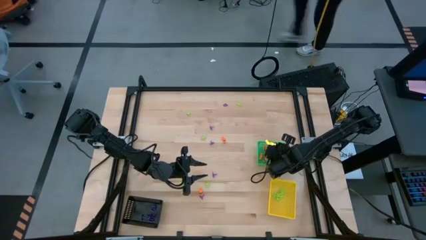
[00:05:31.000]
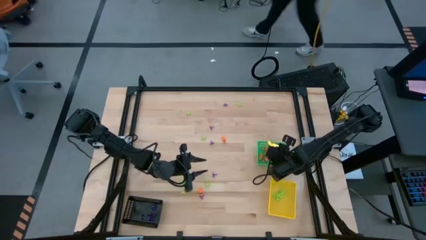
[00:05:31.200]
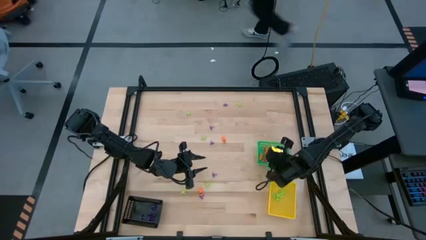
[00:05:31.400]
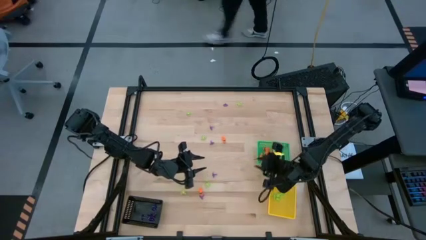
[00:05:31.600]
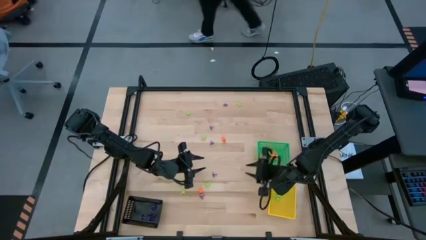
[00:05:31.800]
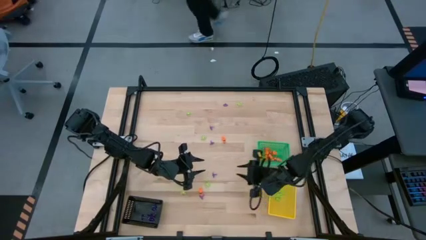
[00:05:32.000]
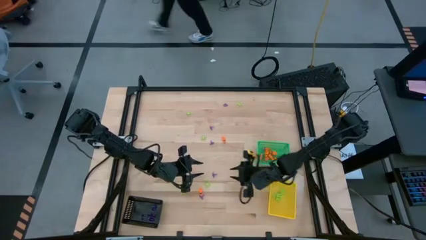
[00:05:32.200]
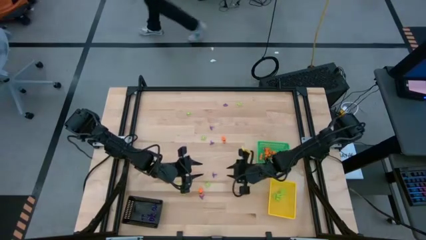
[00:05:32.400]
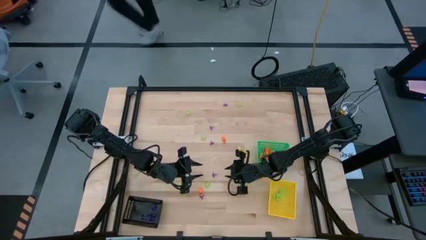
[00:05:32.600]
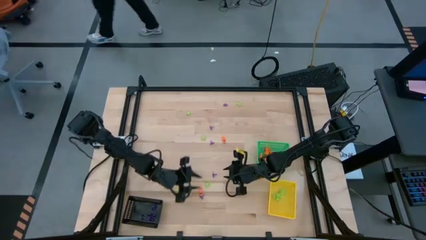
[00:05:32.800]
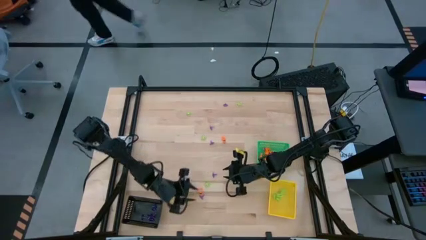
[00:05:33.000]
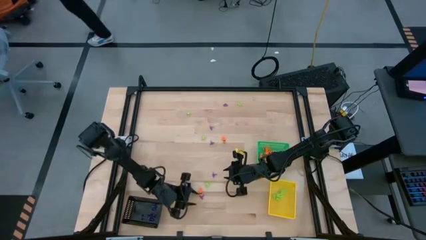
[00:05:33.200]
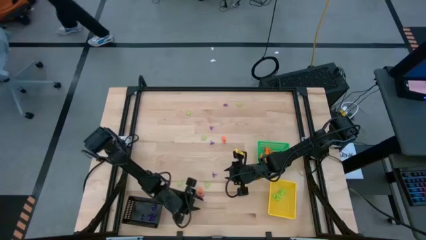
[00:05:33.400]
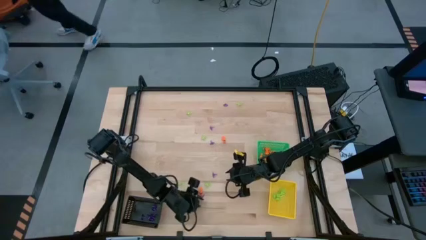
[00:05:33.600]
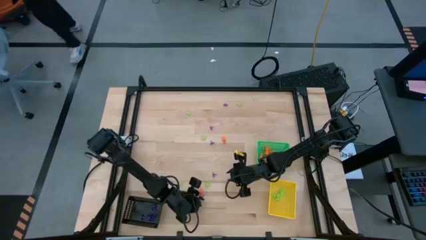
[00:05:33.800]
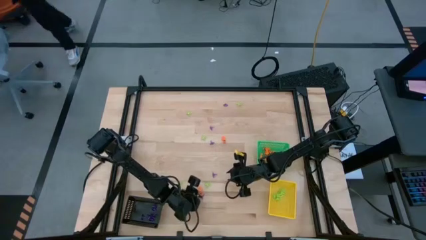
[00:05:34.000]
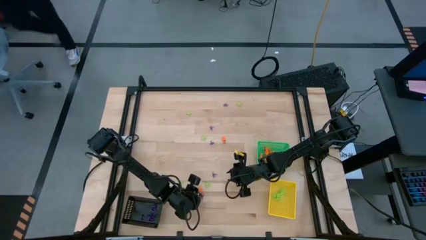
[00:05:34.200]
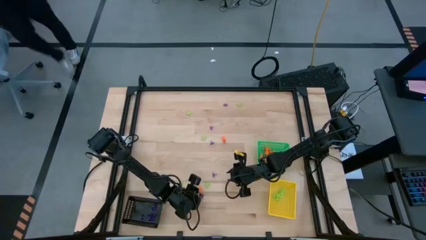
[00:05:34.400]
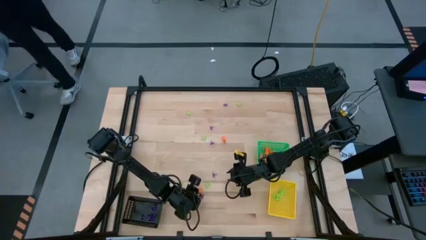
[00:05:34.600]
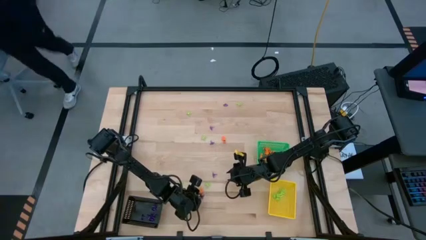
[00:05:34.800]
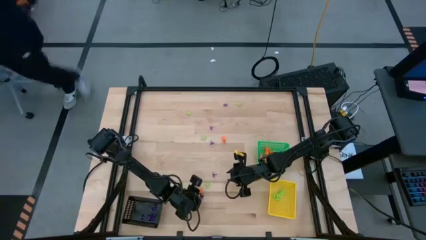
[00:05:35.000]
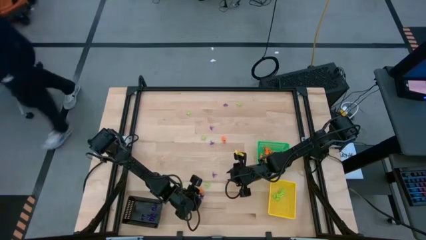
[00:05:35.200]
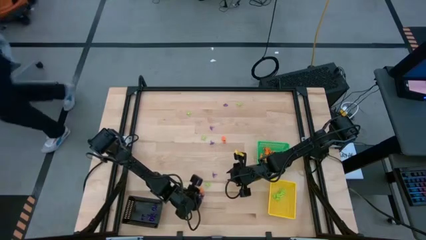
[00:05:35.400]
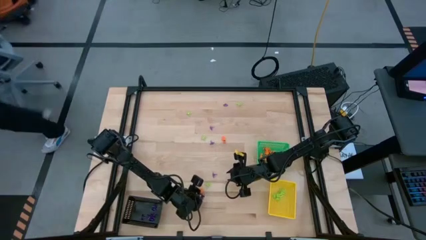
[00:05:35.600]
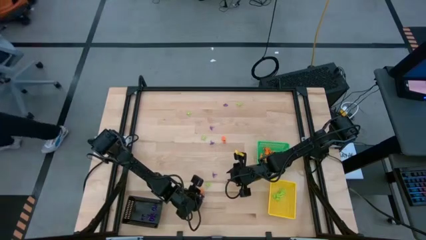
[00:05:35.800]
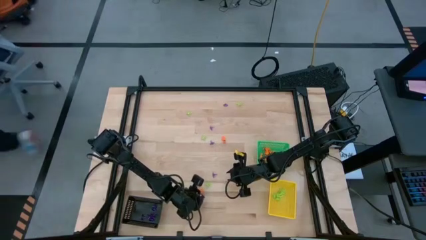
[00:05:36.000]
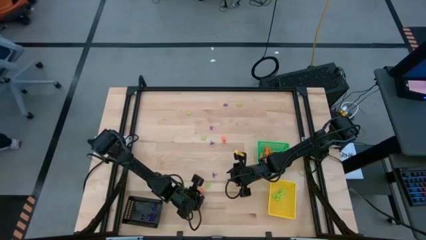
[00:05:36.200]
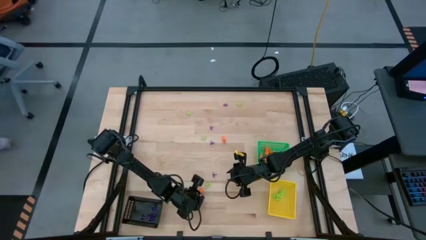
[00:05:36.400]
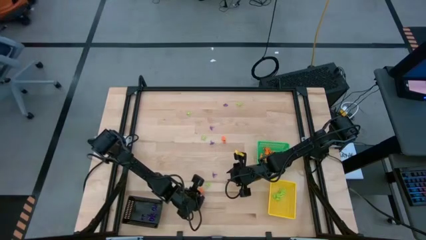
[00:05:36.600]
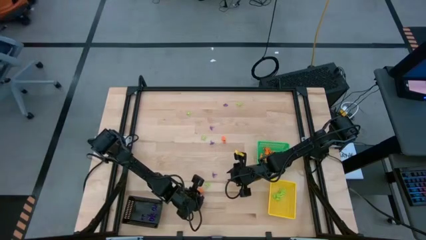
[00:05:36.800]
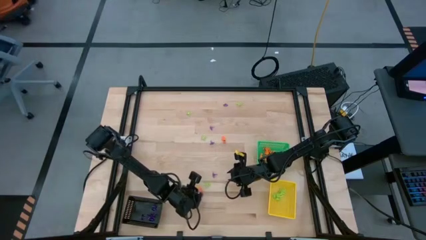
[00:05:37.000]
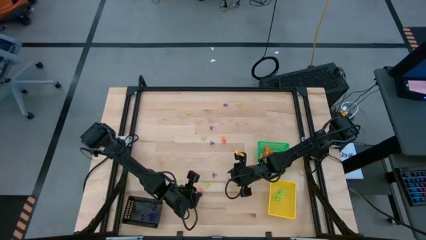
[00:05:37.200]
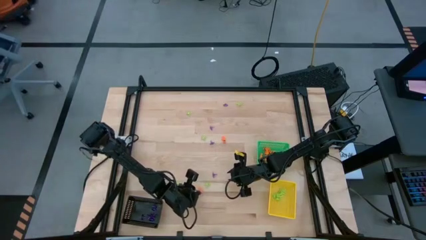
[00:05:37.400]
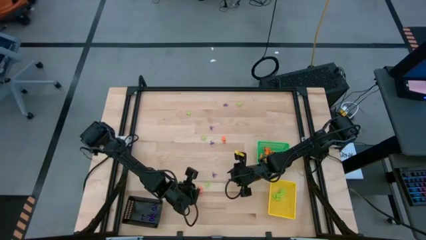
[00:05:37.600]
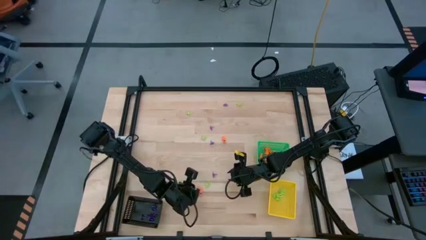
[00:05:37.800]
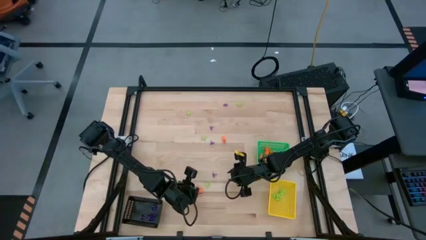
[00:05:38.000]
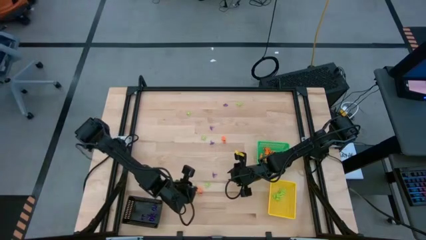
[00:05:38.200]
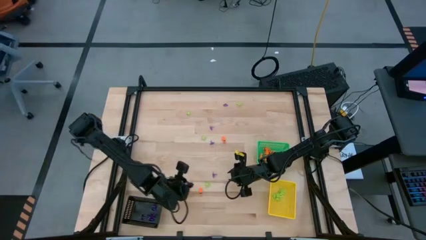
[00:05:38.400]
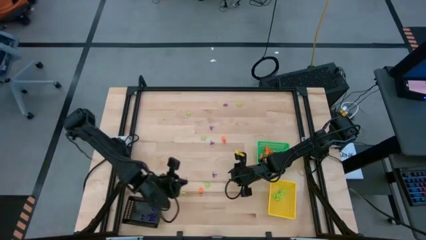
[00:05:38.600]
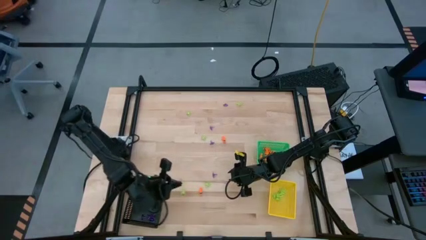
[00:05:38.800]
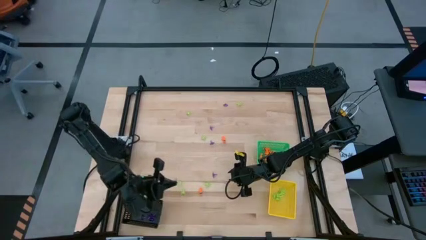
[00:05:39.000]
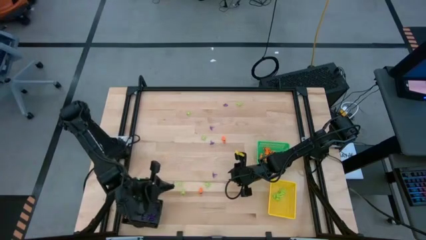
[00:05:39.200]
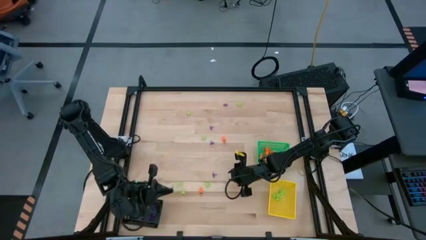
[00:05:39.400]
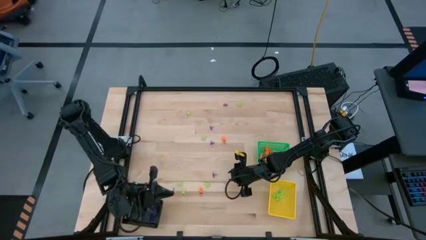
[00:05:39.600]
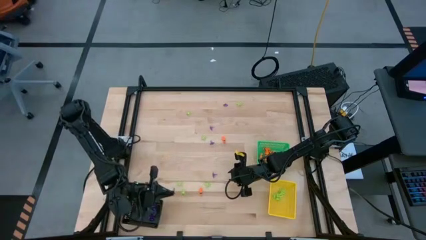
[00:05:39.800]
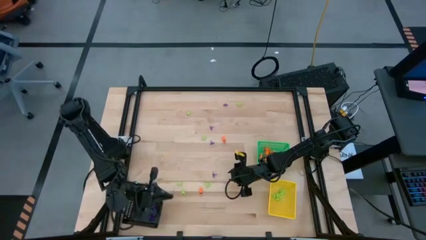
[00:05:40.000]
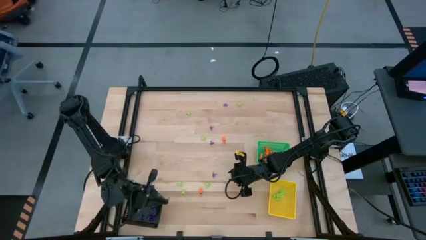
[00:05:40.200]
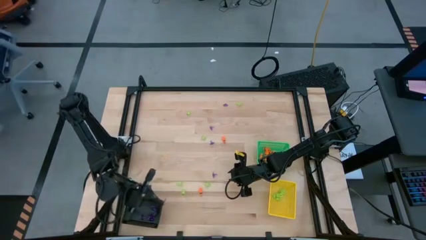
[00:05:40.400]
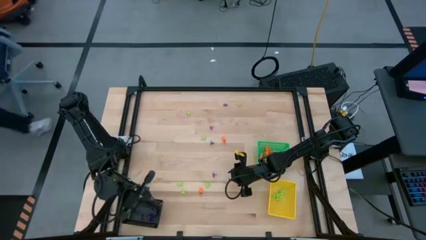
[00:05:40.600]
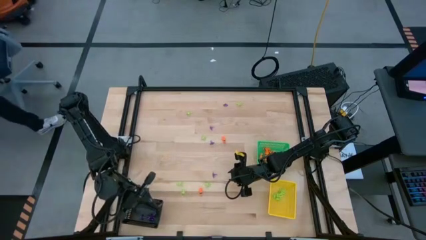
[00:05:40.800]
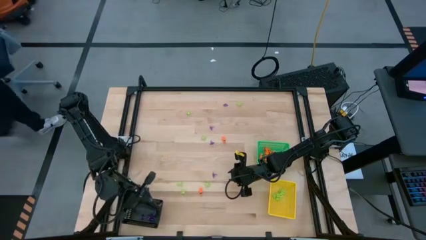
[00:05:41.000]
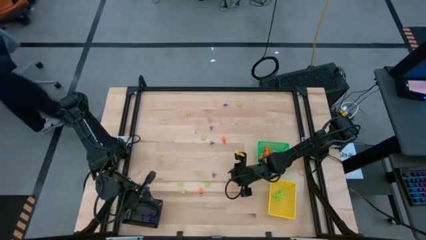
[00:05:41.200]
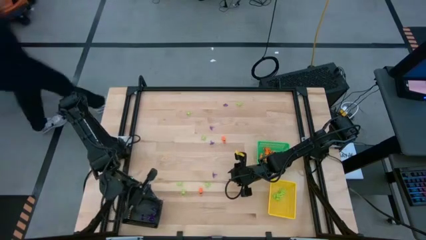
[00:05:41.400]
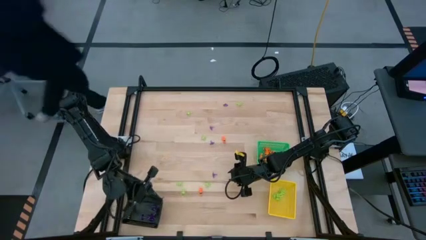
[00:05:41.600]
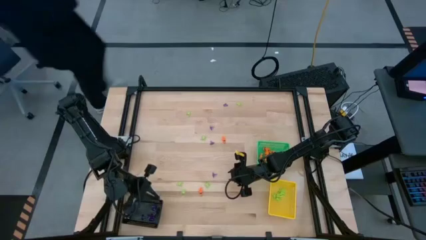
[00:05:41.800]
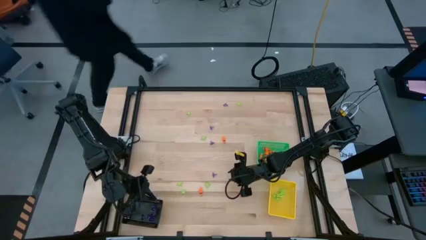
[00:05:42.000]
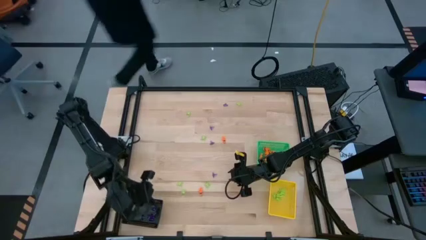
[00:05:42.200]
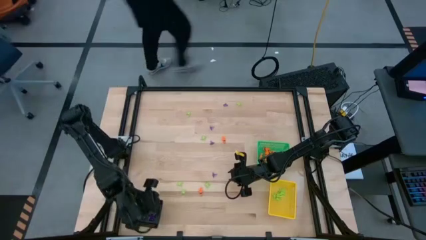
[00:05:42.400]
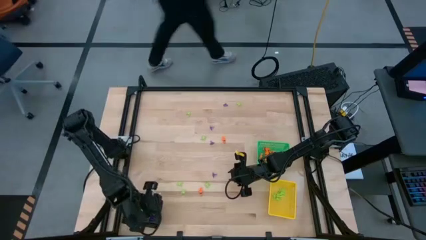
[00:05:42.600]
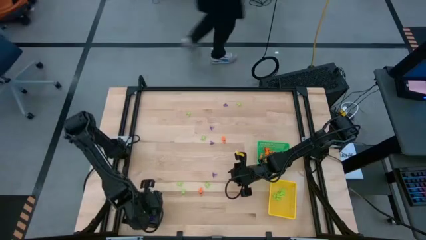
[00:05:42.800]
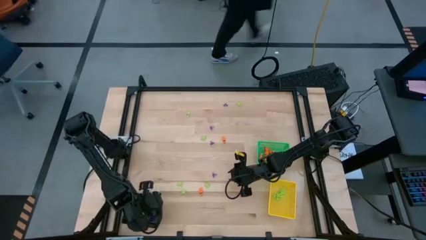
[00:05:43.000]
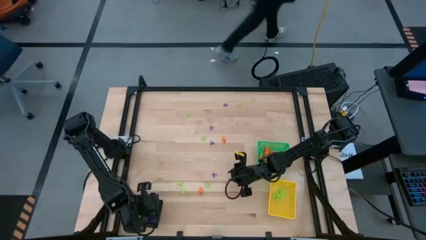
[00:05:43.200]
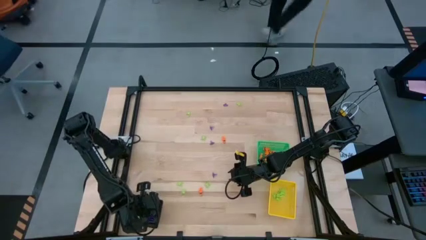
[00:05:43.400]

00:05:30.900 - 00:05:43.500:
Task: Sort Halloween decoration
Put the purple witch hat toy into the black bin
